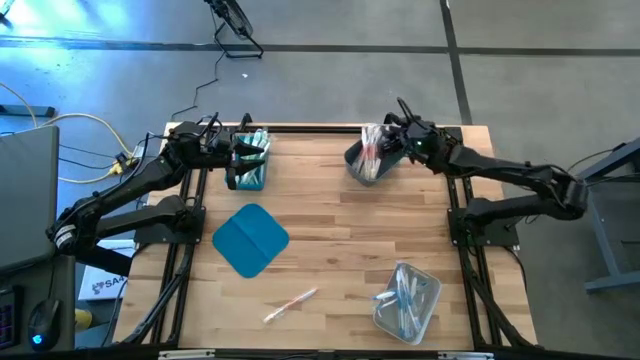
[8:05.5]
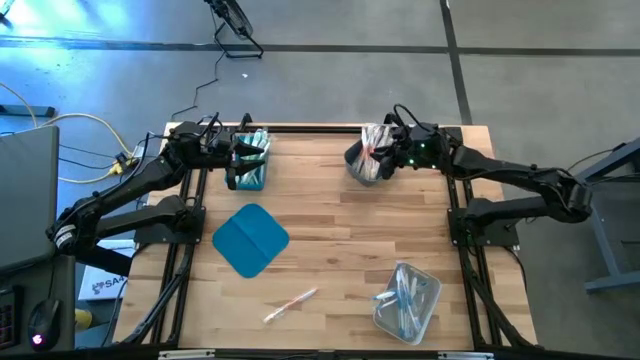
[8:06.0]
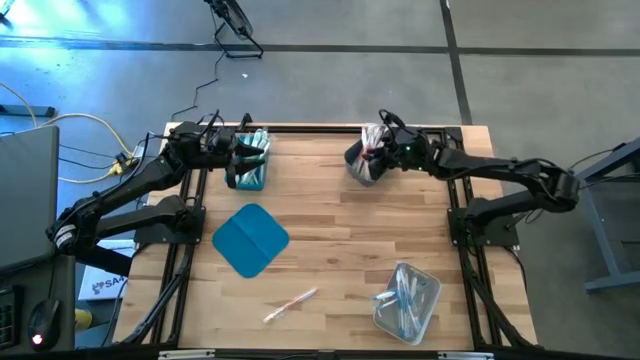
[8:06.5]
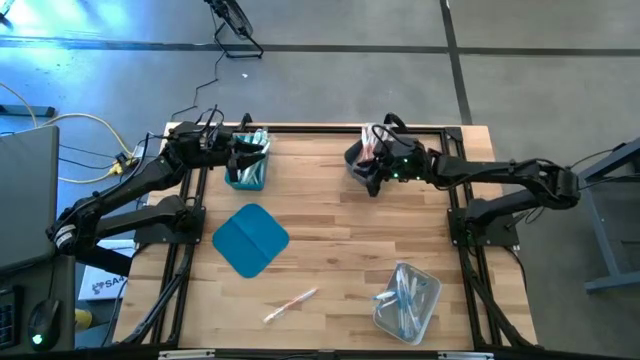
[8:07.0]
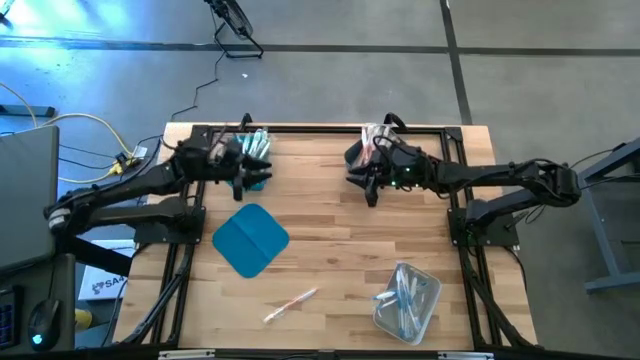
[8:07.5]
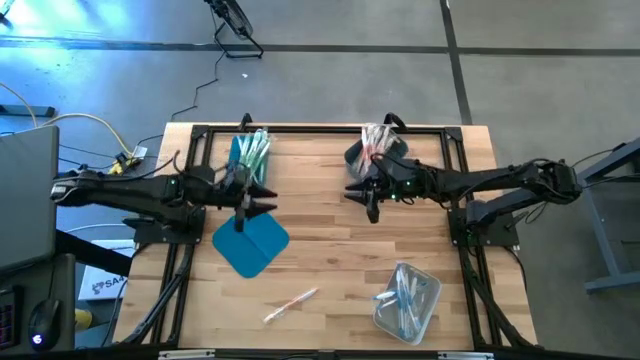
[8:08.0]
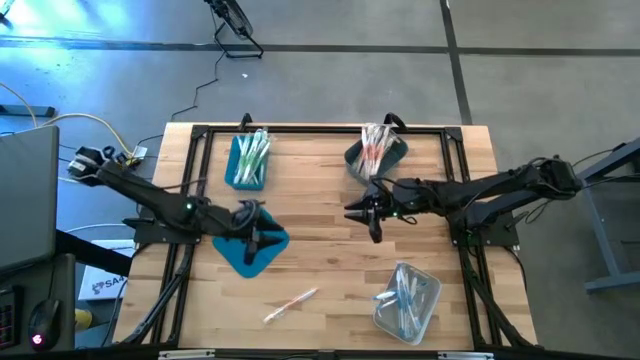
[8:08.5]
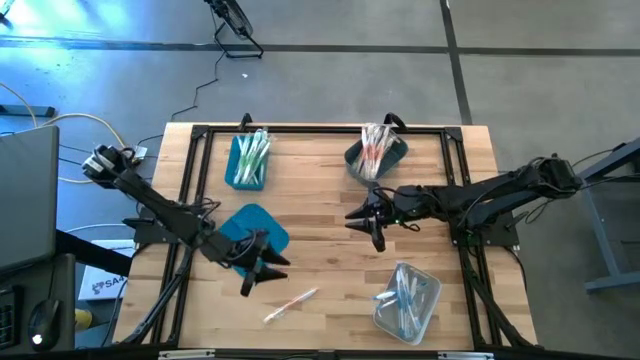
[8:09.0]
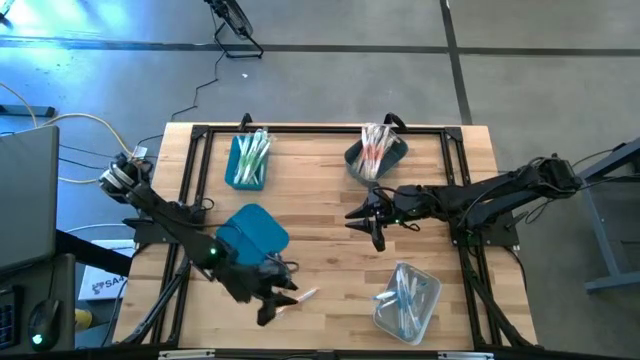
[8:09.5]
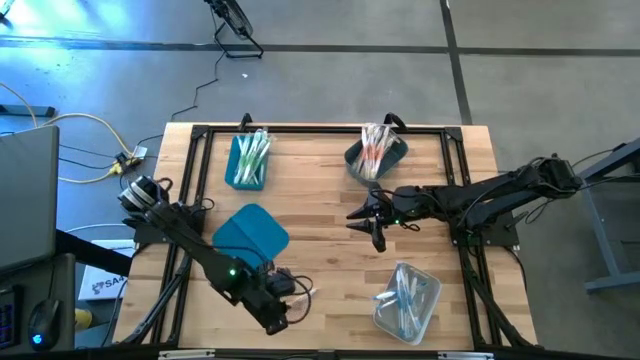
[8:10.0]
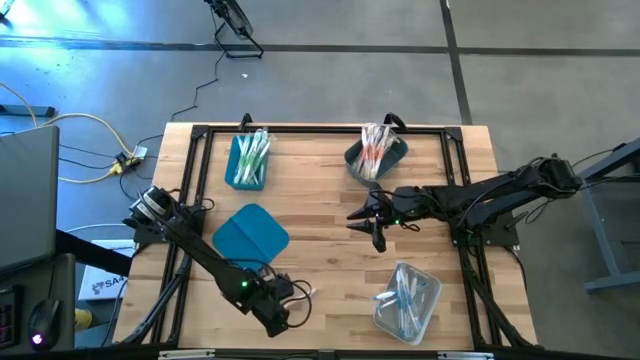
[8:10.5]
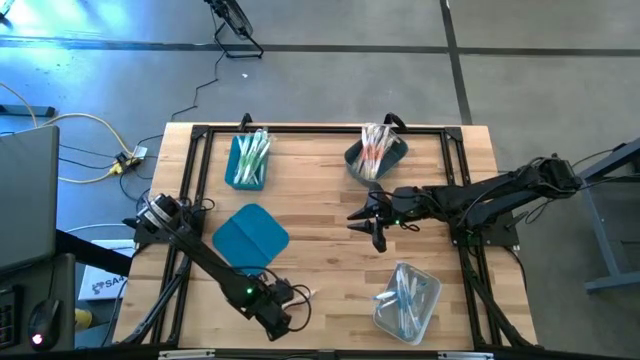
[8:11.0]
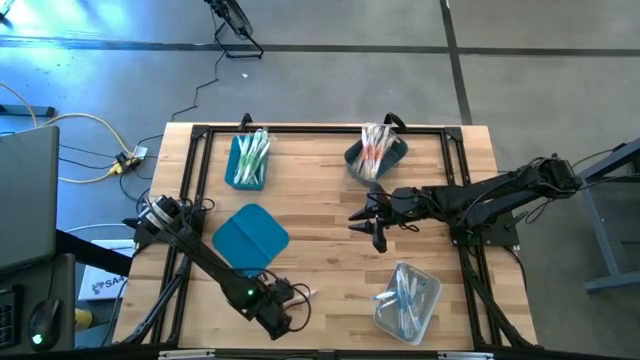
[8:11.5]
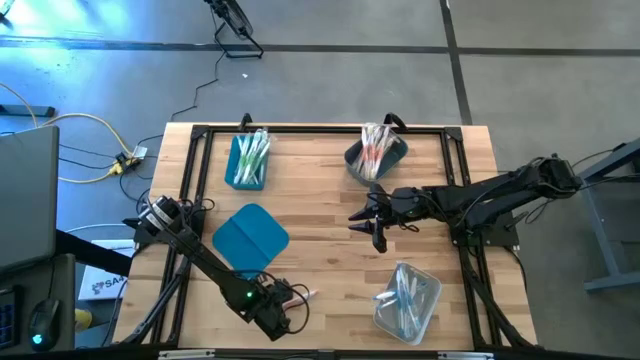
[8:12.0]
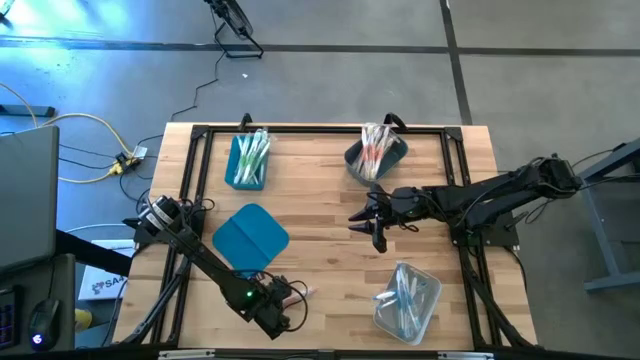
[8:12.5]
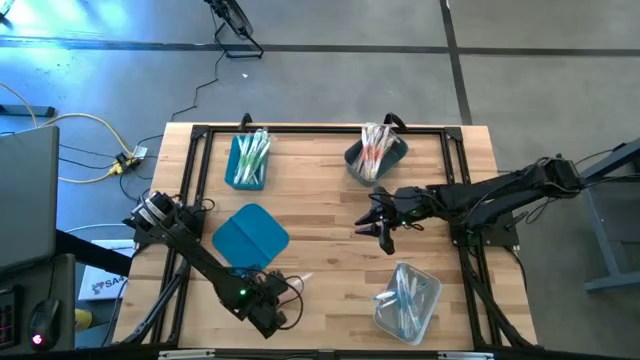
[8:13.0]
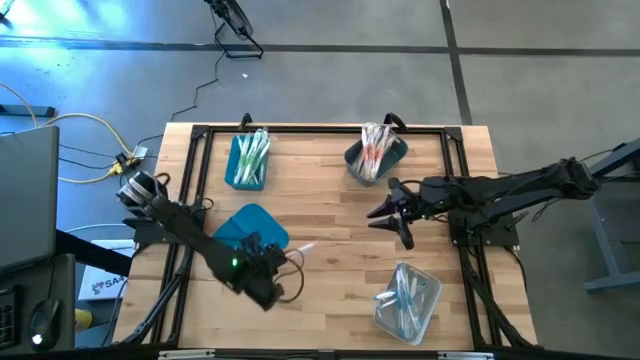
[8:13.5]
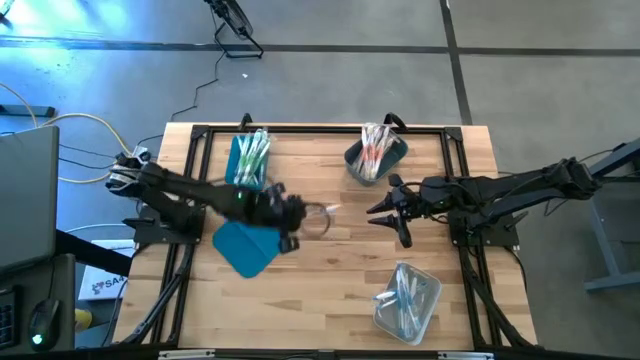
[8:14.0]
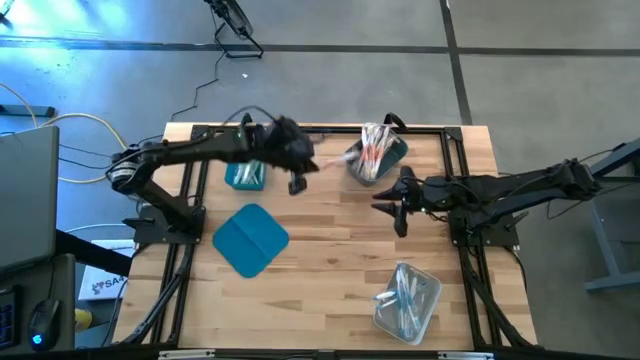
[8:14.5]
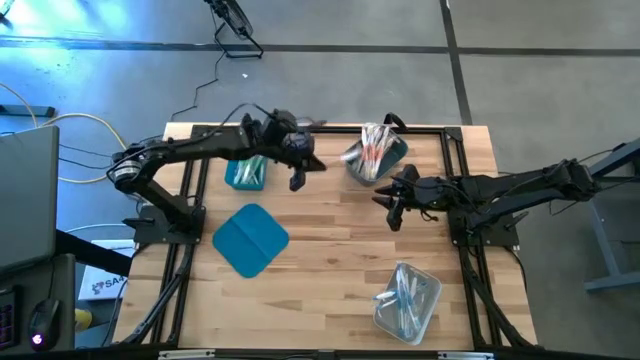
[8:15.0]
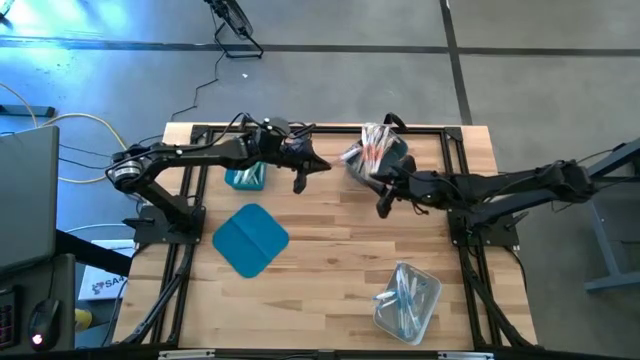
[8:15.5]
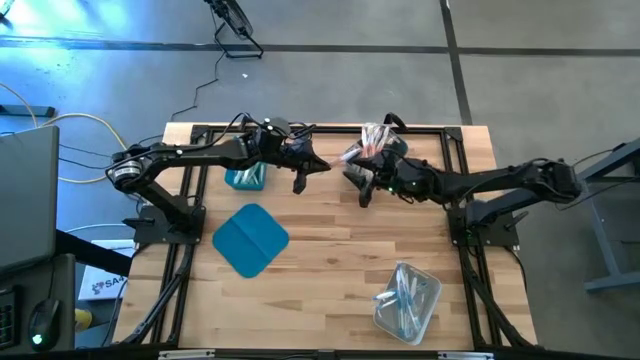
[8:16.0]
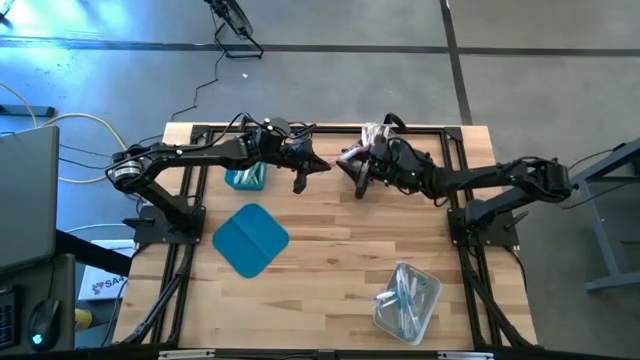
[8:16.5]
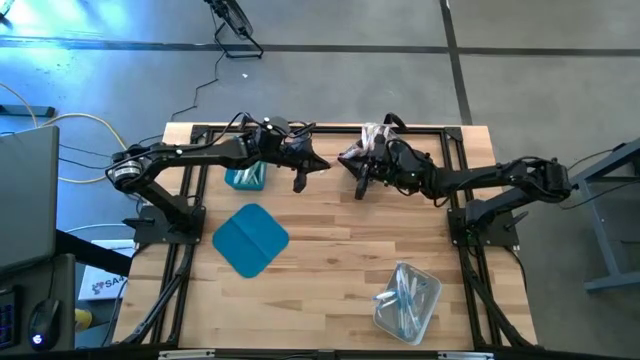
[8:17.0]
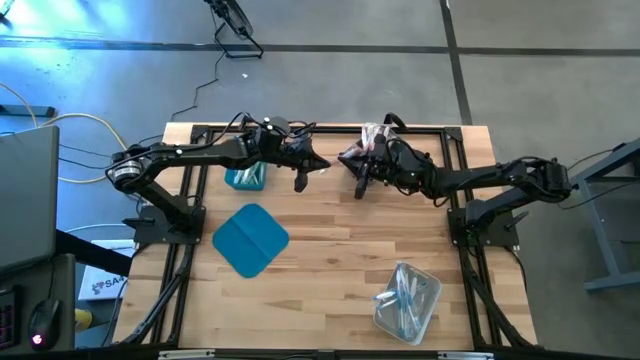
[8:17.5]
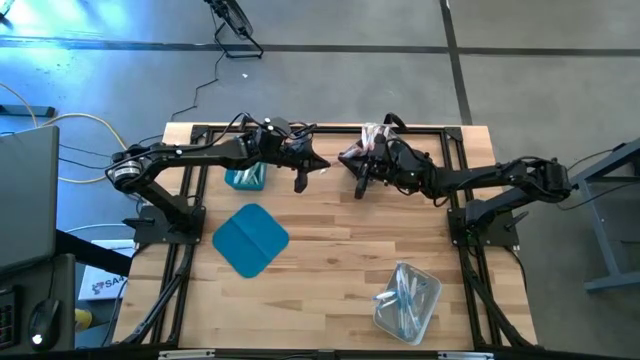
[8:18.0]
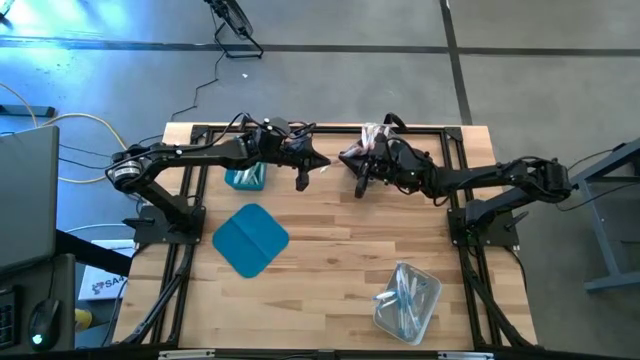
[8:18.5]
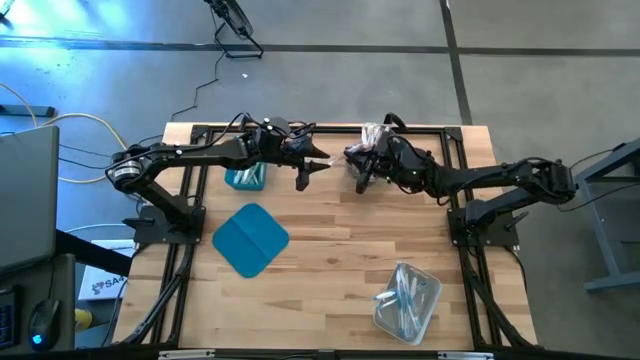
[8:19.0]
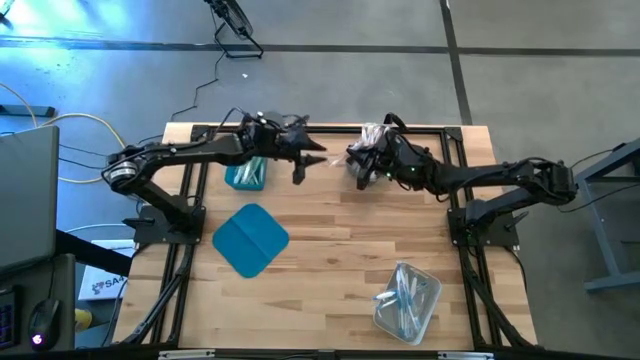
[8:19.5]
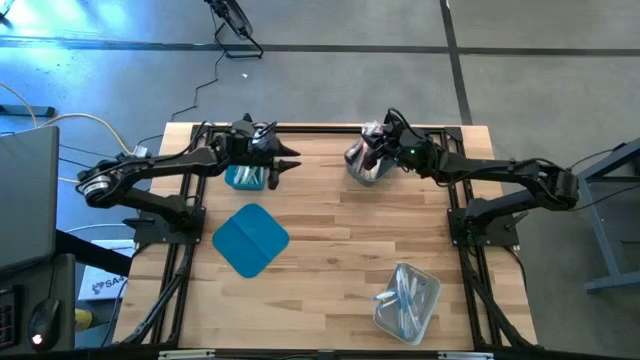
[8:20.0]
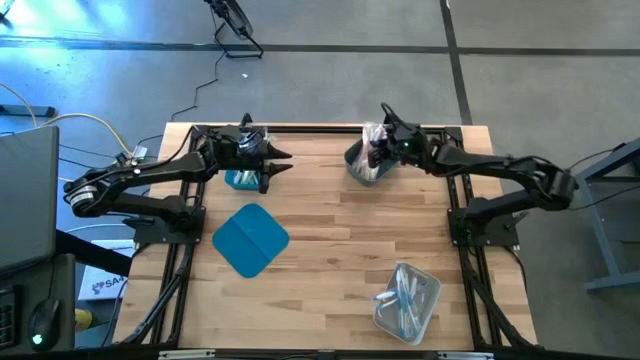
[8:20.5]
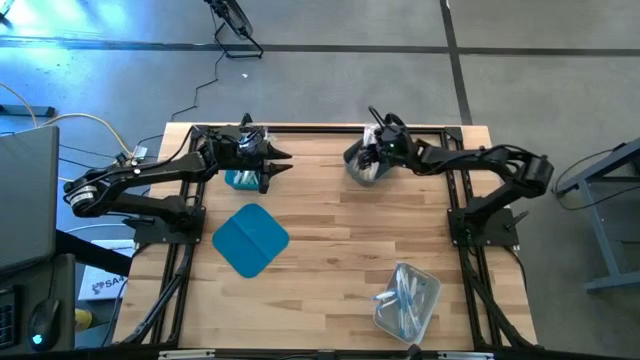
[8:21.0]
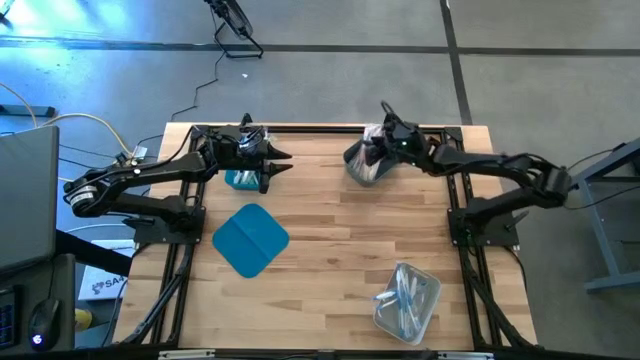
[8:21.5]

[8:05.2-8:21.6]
Task: Pick & Place Toothbrushes
Put the orange toothbrush into the dark gray bin
